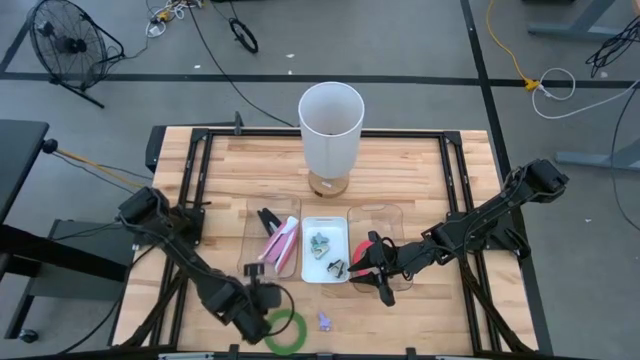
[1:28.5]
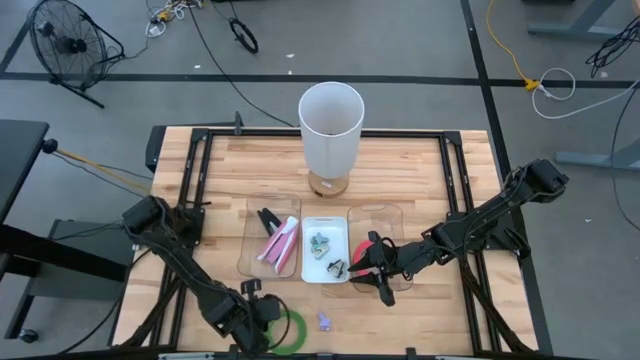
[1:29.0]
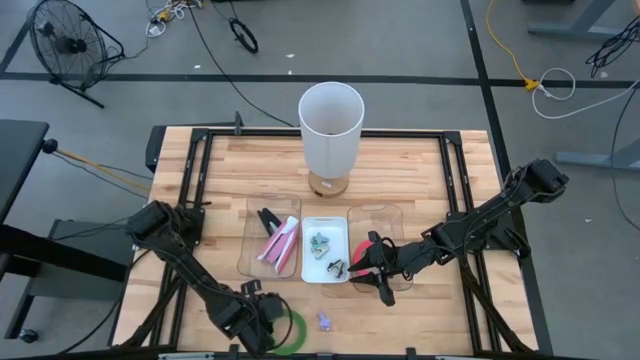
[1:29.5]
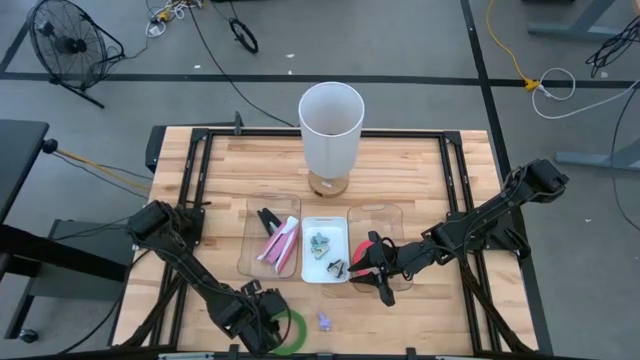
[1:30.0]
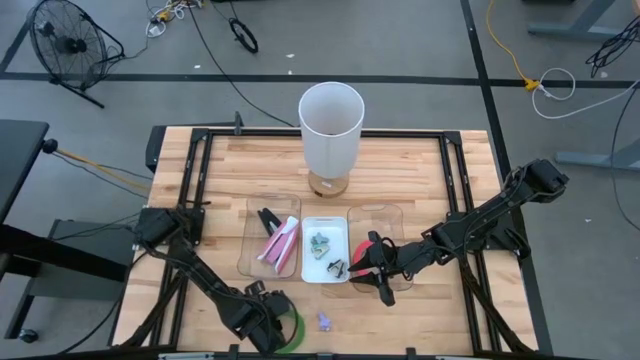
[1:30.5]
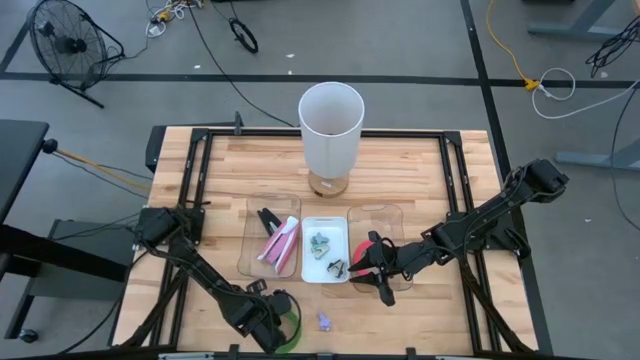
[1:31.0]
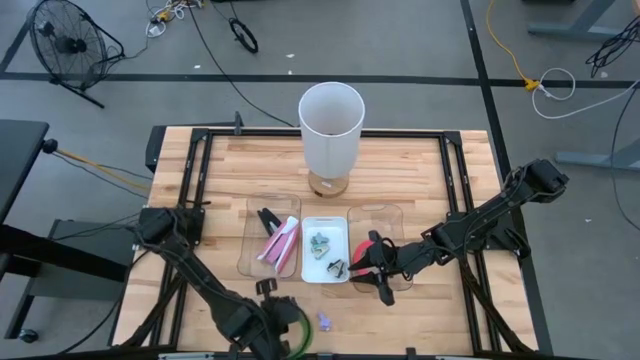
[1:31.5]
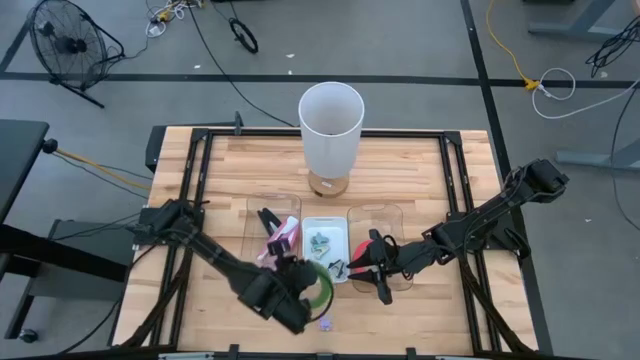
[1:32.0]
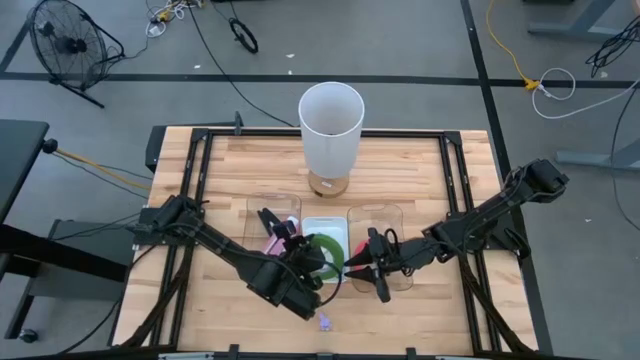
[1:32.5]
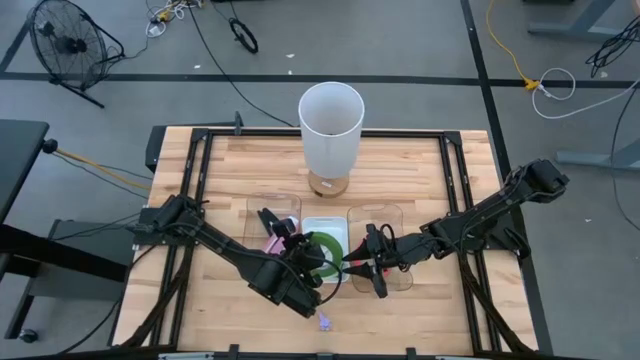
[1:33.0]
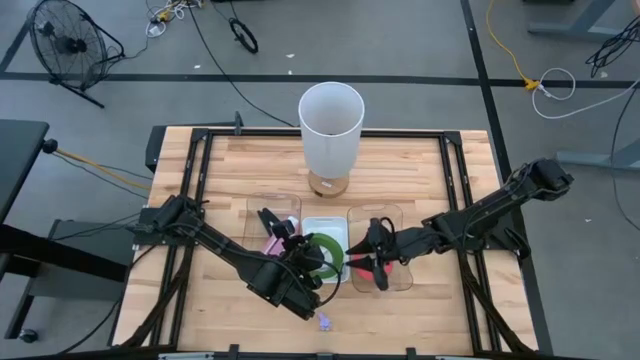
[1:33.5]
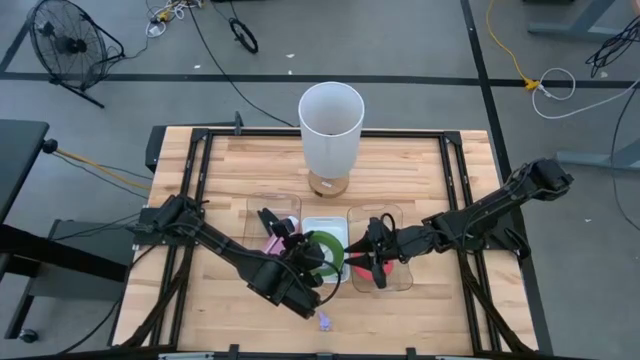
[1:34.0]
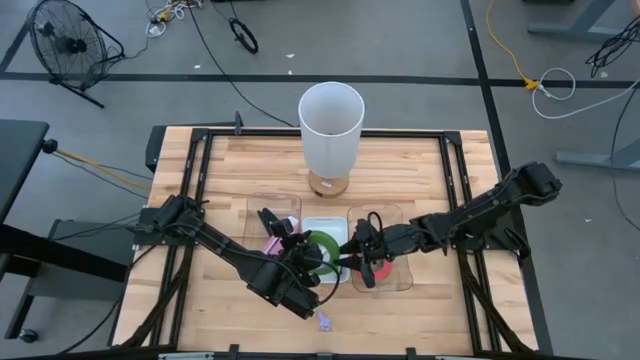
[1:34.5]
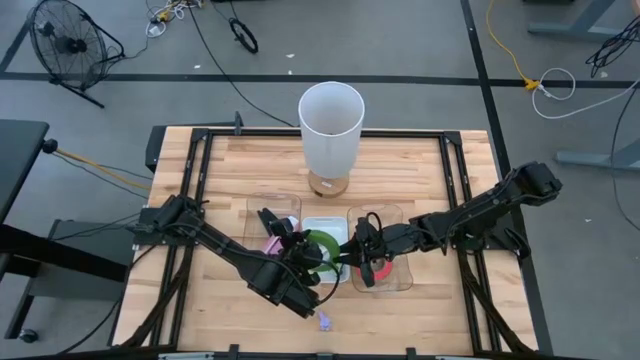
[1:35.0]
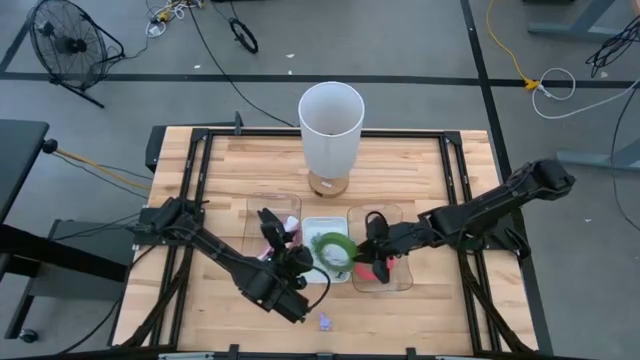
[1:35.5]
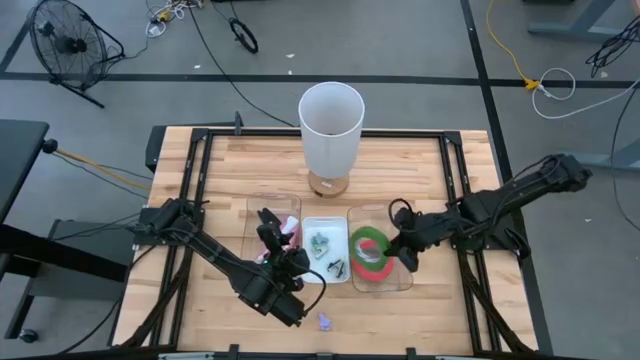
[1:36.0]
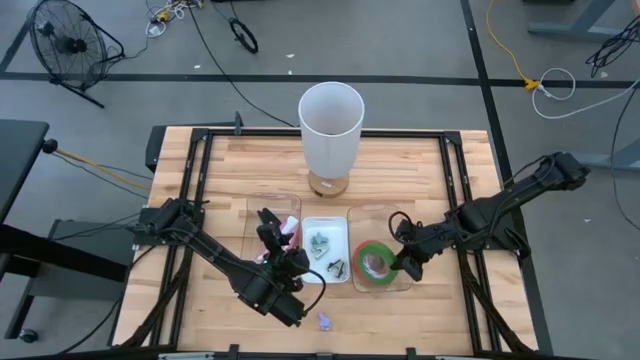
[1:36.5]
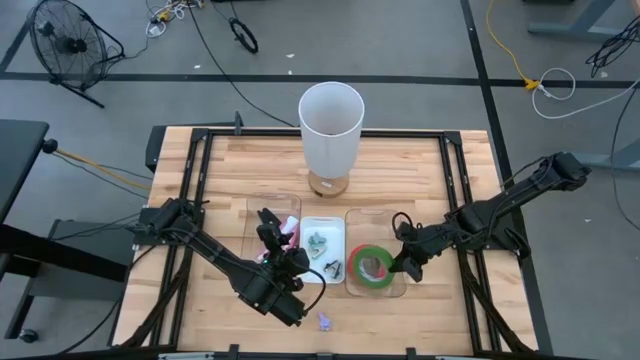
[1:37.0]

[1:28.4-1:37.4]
Task: Pick and place Stapler, Stapler remover, tape
Put the green tape into the right transparent bin

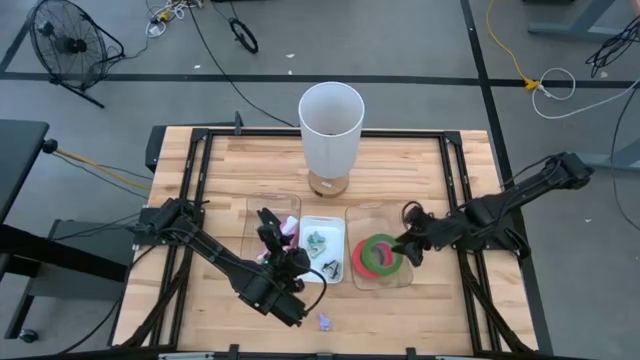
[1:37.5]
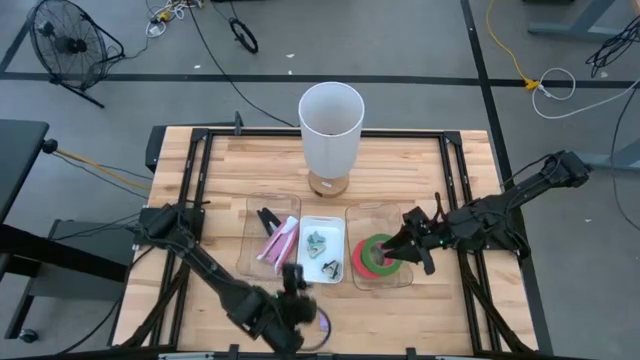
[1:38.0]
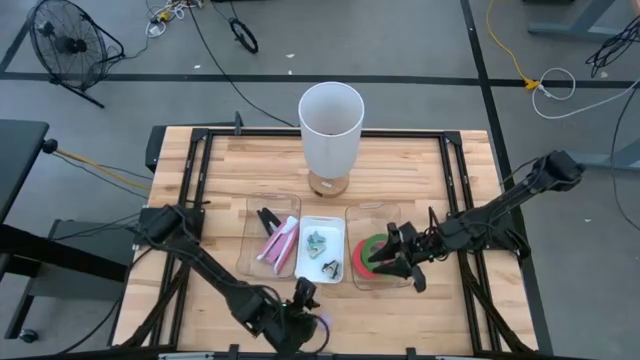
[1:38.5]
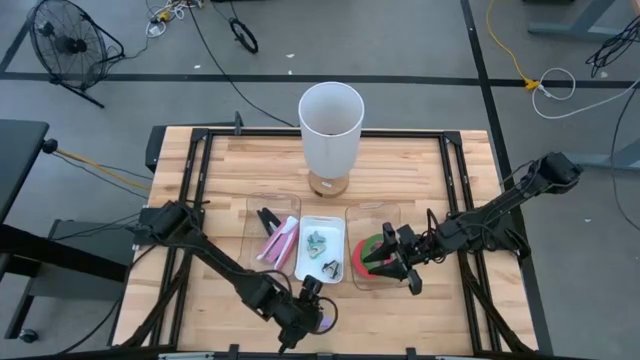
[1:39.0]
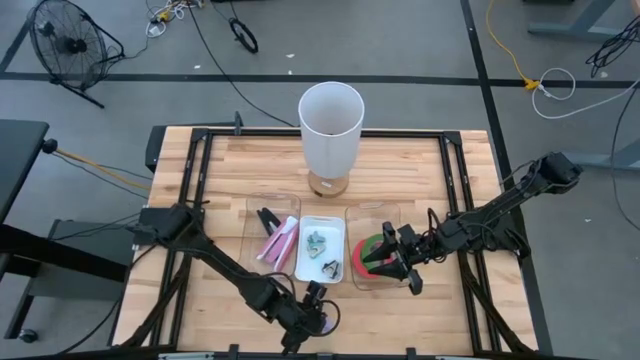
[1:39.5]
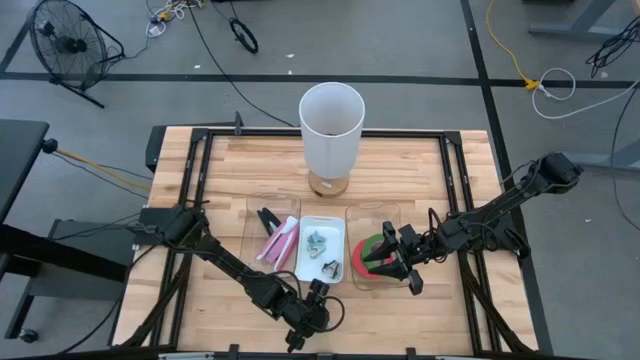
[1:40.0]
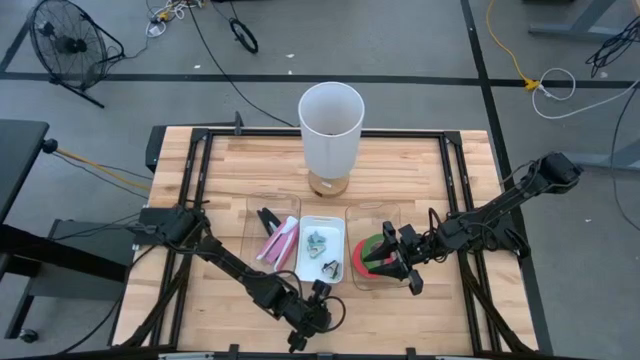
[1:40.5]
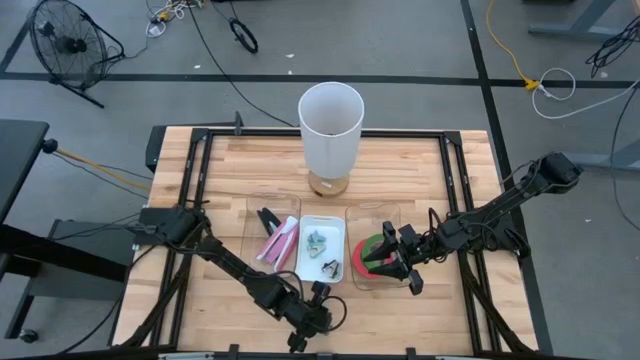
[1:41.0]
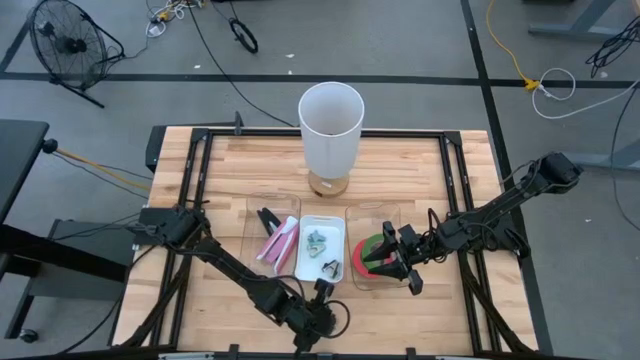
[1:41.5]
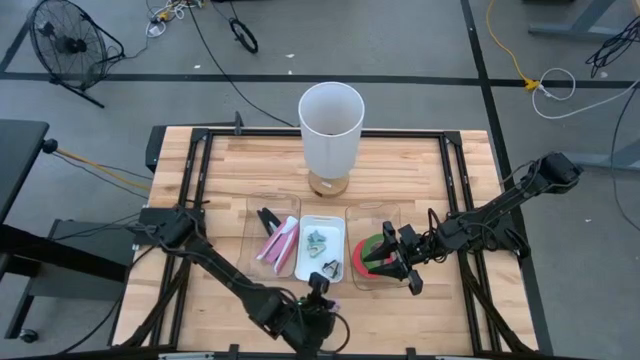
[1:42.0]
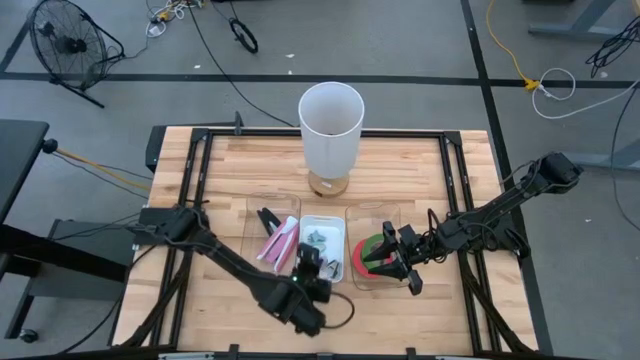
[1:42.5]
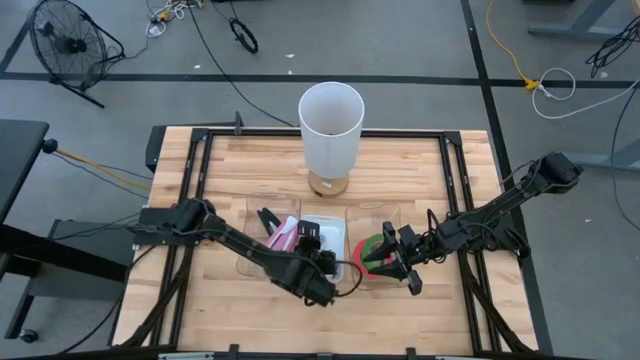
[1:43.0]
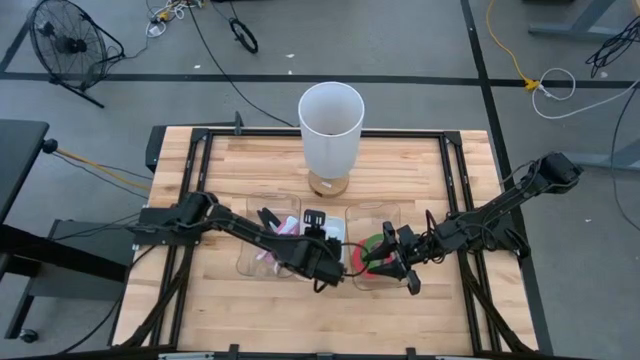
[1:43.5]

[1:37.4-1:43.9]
Put the violet staple remover into the white bin

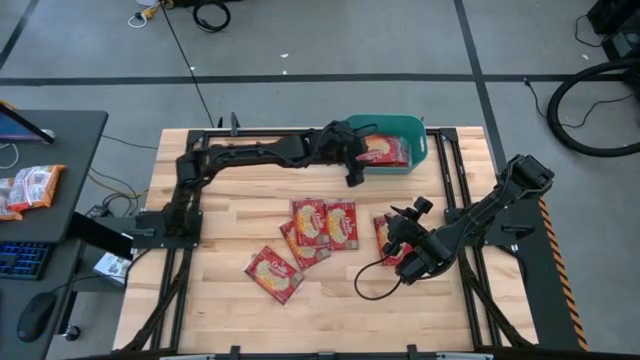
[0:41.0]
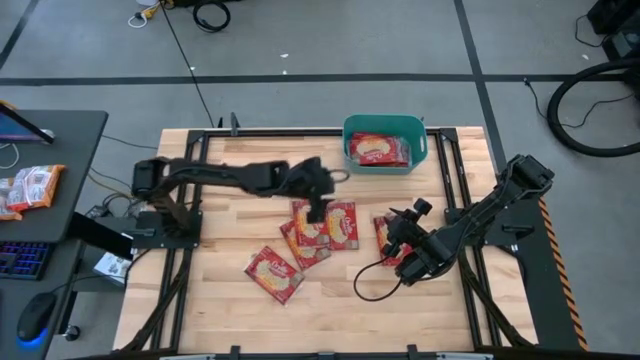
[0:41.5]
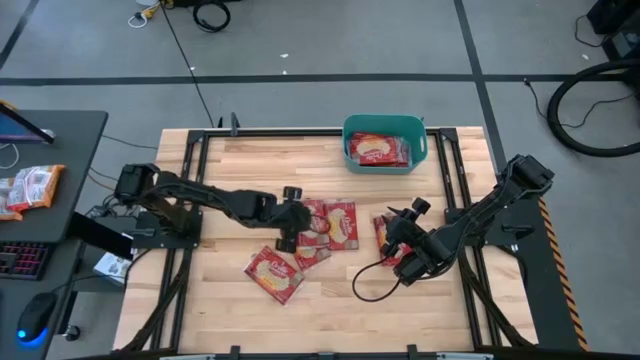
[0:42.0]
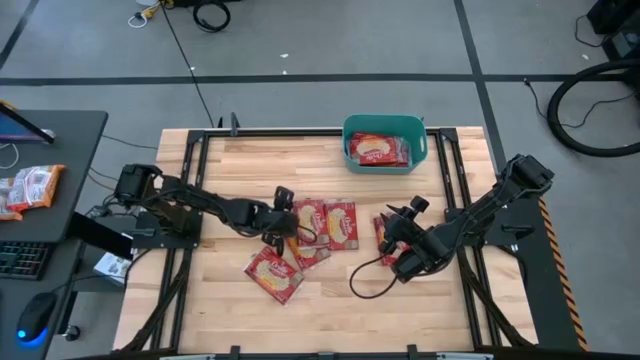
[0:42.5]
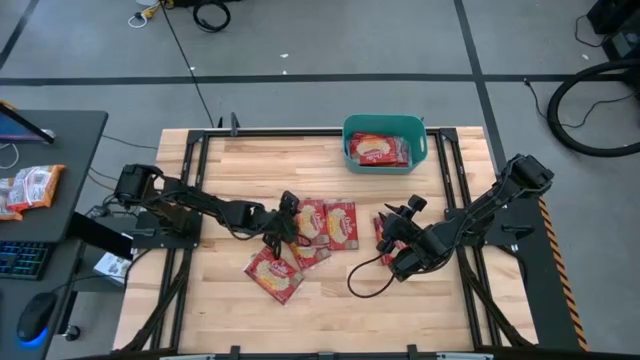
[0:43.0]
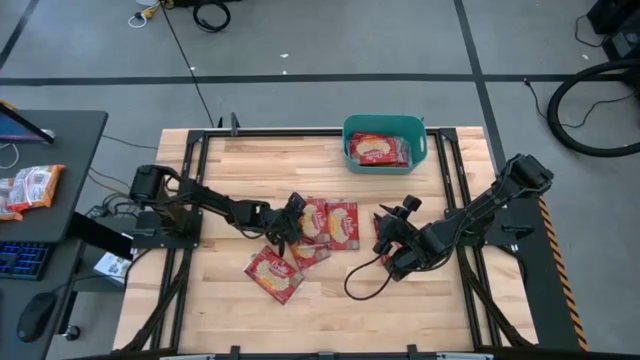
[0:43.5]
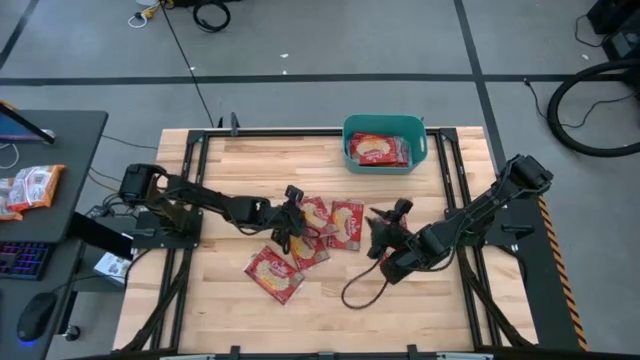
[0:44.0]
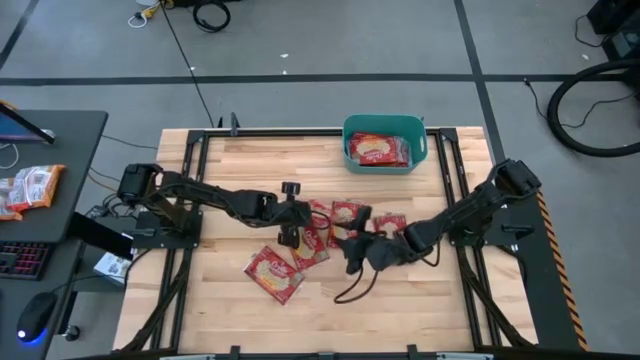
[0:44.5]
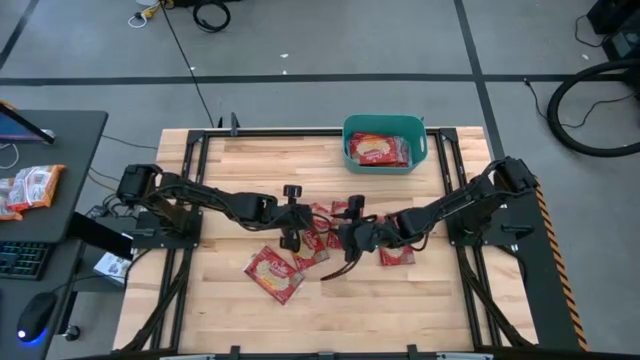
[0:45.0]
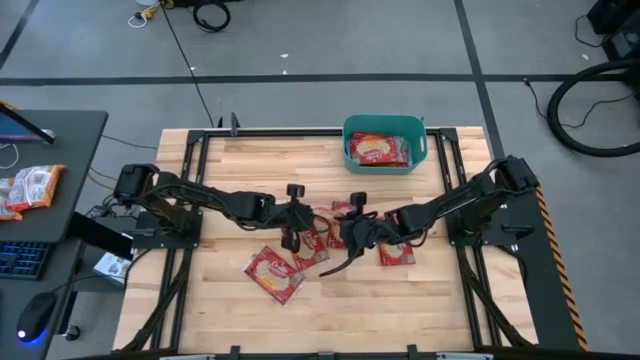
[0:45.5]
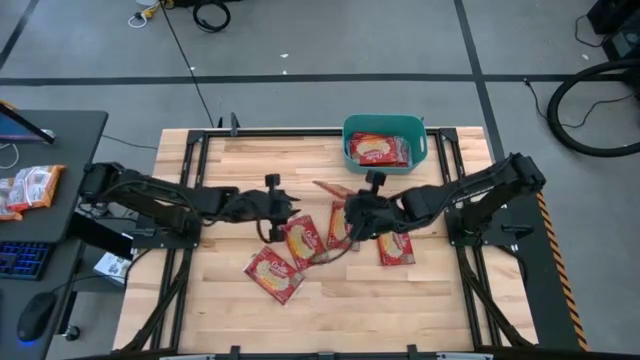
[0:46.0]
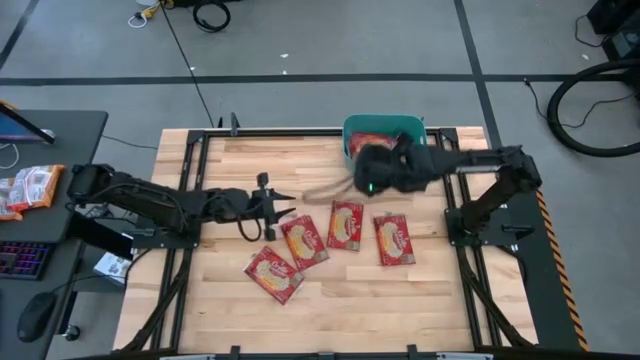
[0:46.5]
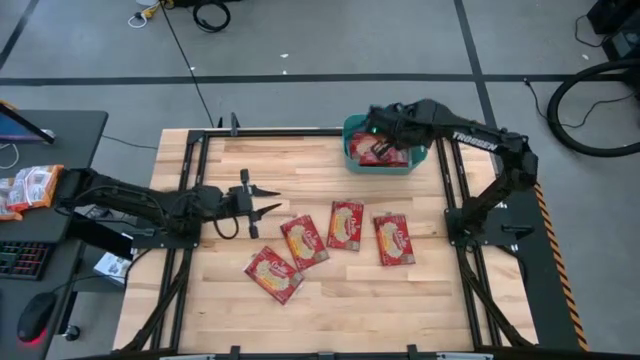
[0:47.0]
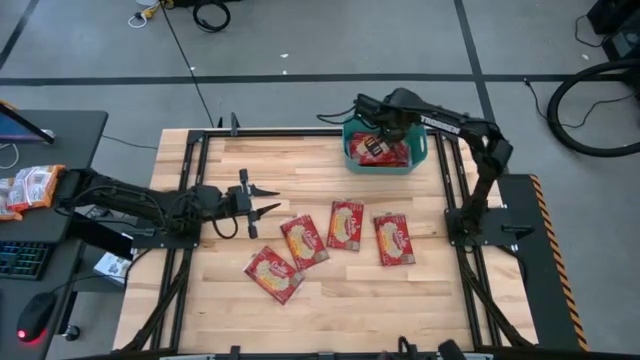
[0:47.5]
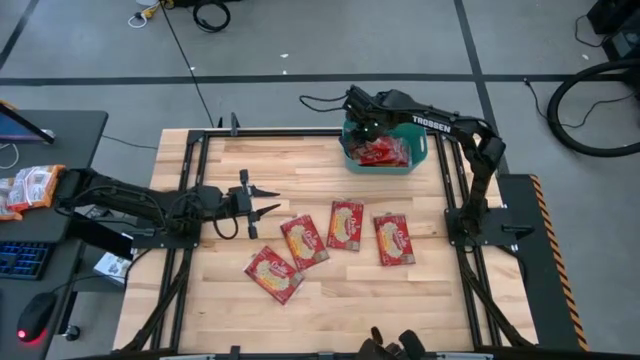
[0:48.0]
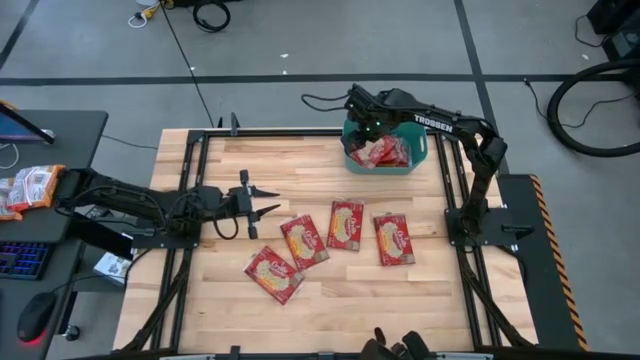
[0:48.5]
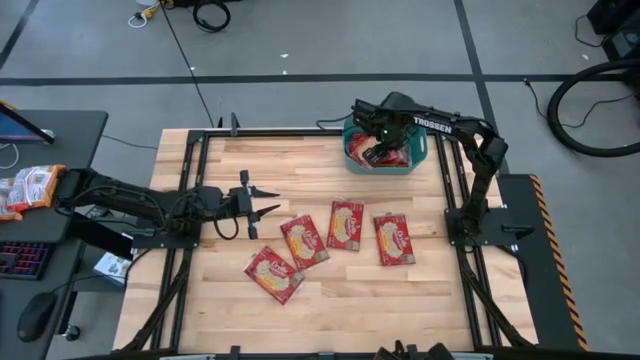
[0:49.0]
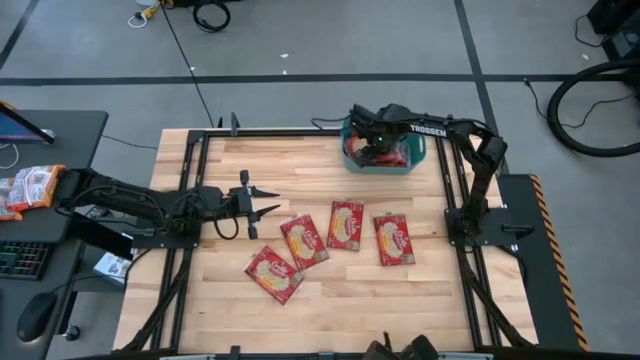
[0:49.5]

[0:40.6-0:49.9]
Task: Sort popcorn bags into baskets
Put the popcorn bag into the green bin
